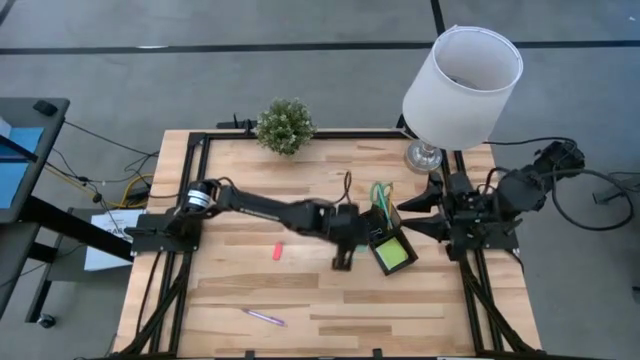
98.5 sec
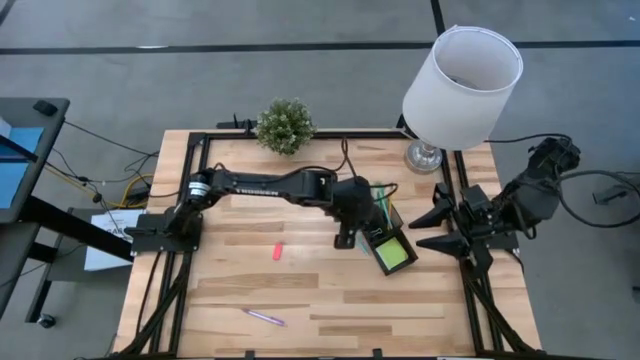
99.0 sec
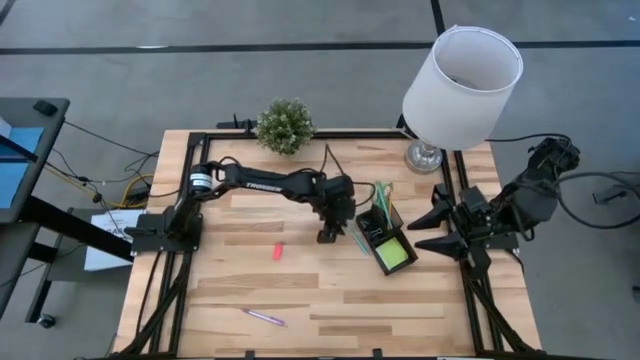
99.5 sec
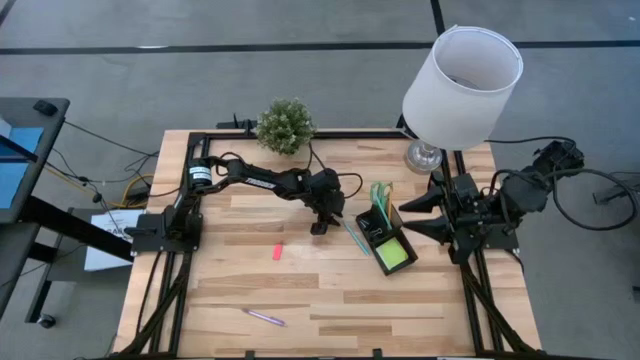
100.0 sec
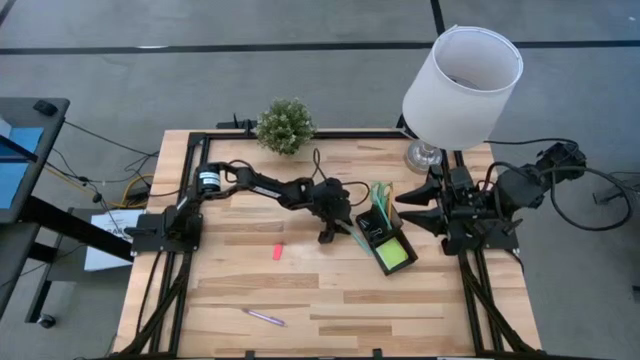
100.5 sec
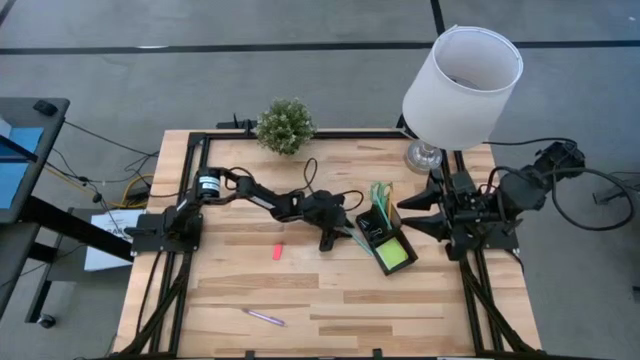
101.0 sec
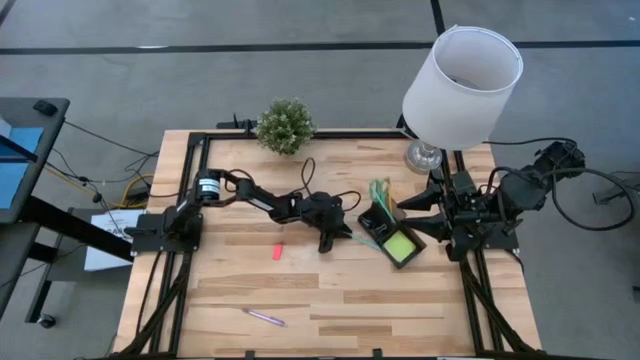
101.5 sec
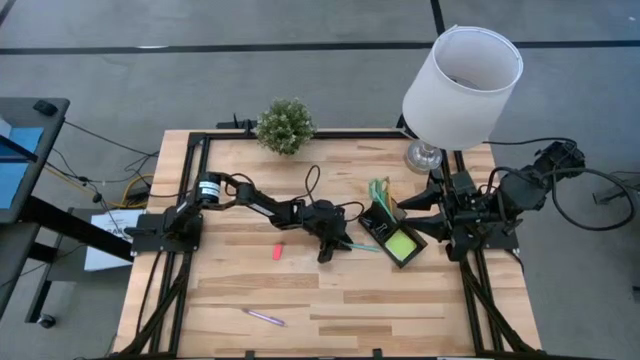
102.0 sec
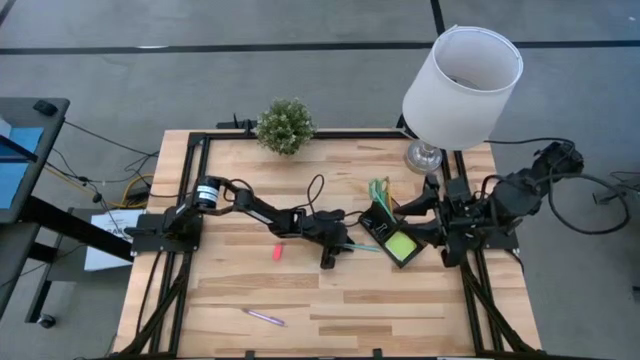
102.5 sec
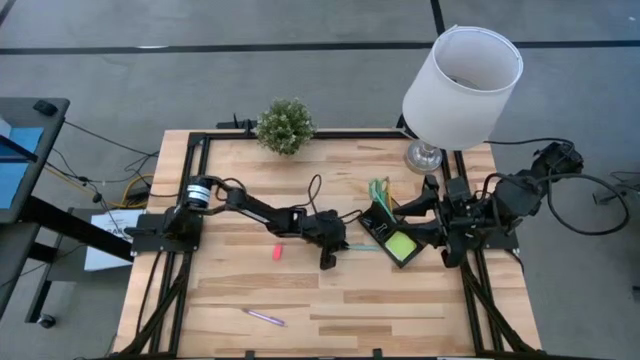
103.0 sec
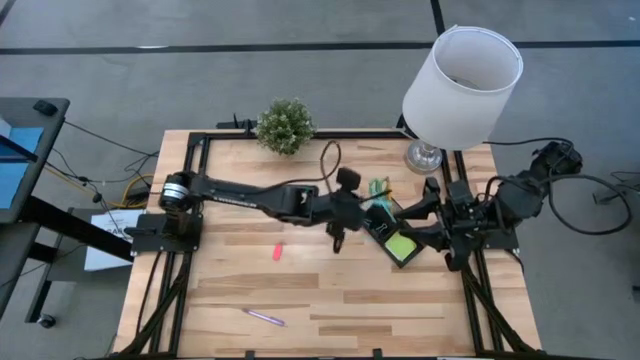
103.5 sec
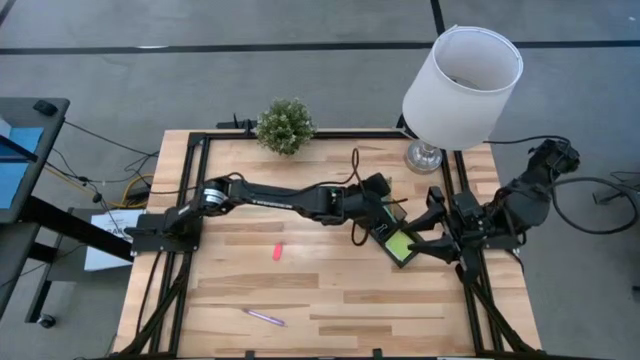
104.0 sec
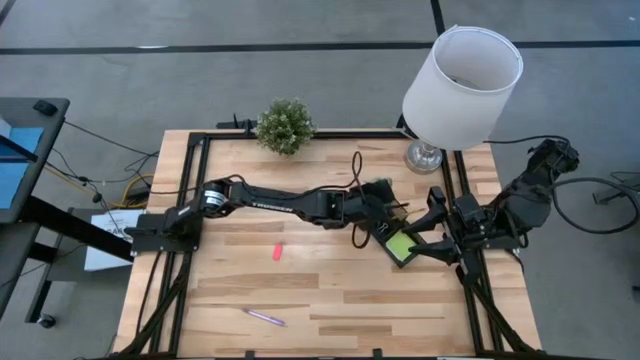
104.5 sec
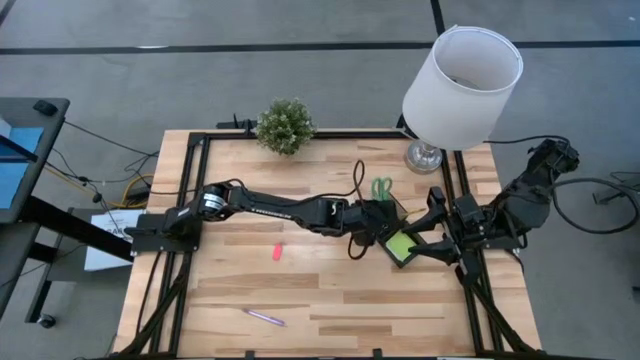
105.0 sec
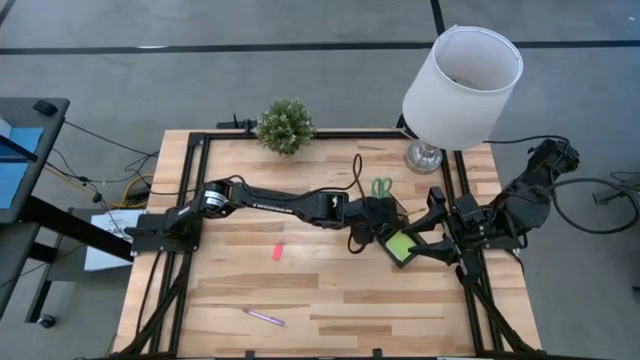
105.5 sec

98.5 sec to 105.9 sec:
Task: Pick and place office supplies into organizer
Put the blue pen into the black desk organizer

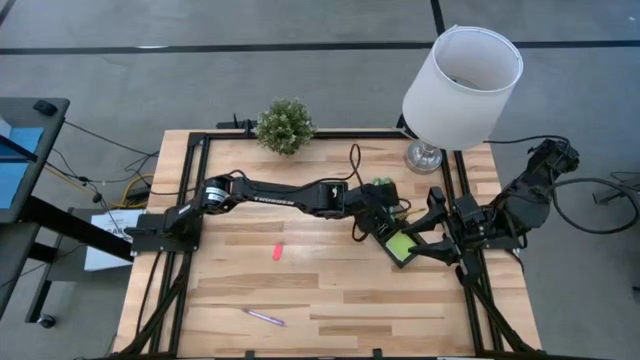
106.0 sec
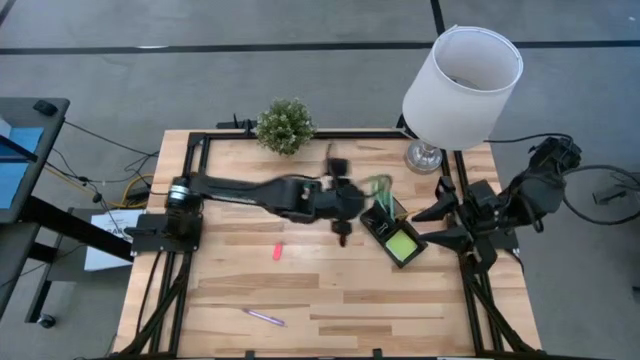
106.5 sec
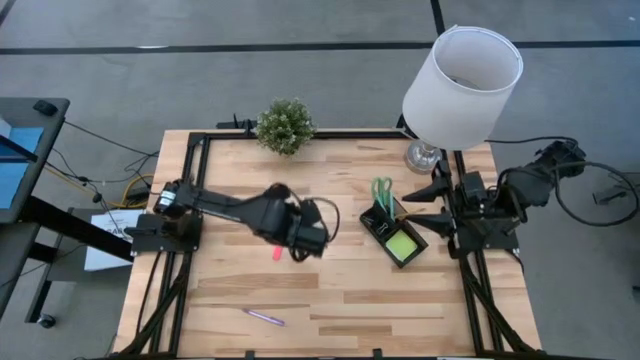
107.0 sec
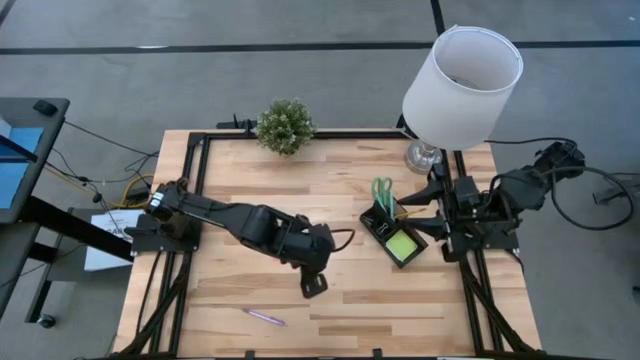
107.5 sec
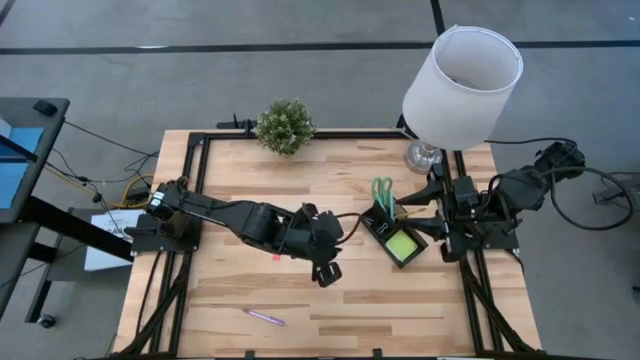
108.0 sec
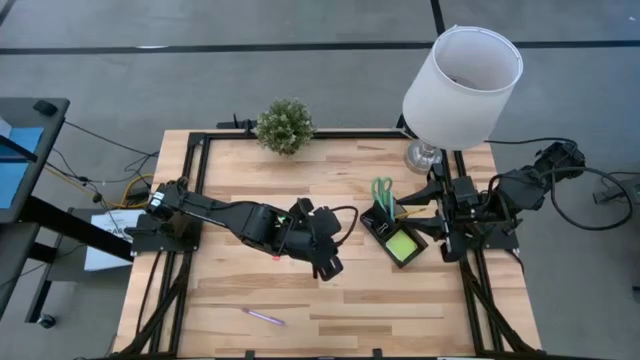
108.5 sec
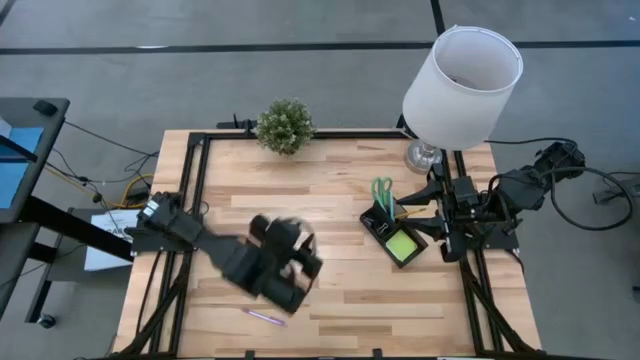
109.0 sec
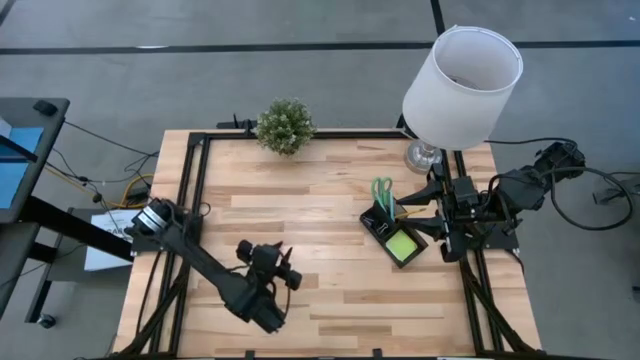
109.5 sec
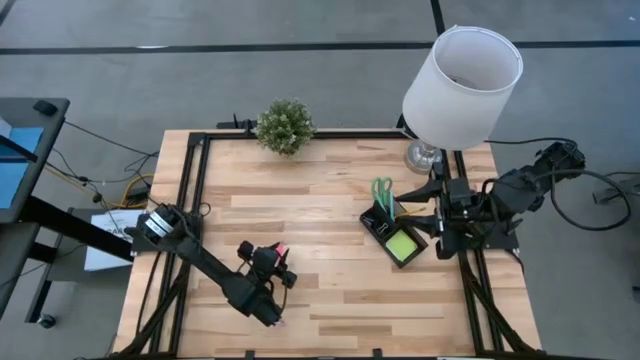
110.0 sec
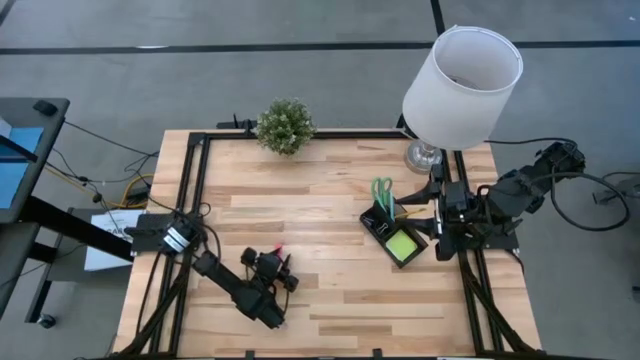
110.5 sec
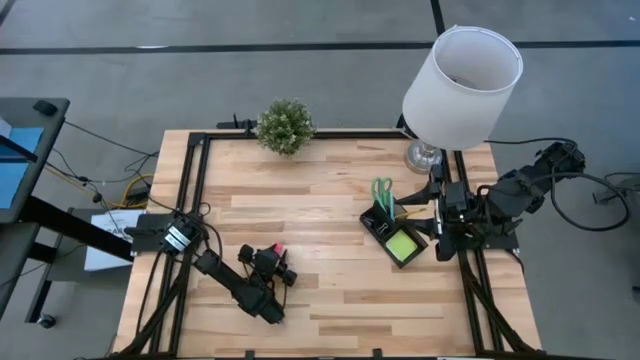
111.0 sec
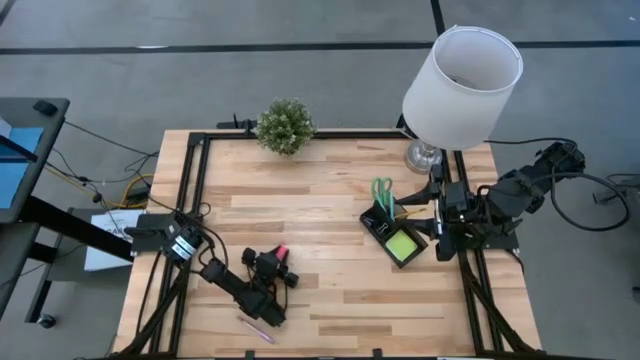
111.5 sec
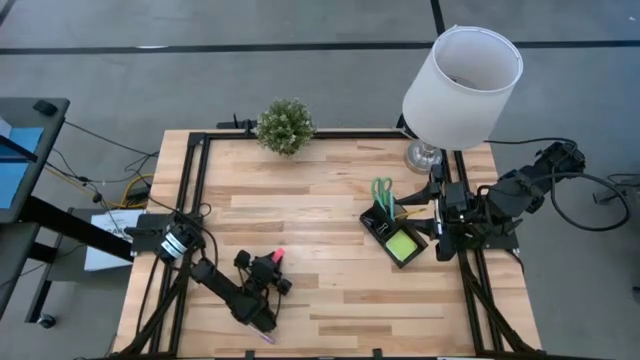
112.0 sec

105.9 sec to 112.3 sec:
Put the pink eraser into the black desk organizer

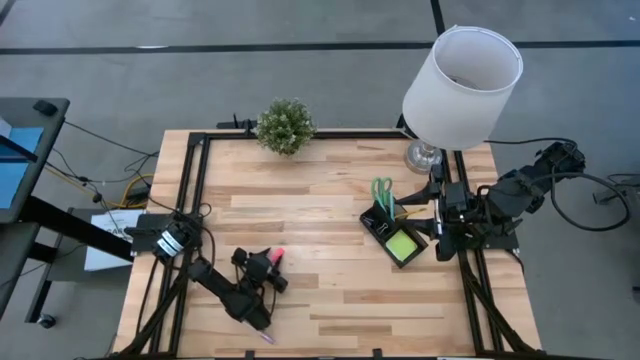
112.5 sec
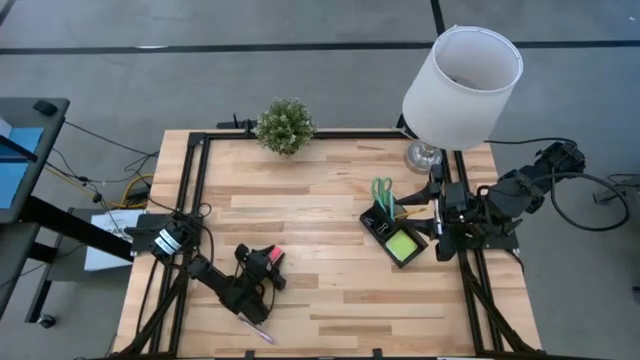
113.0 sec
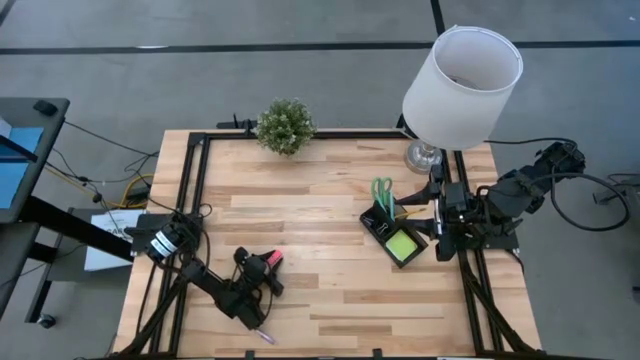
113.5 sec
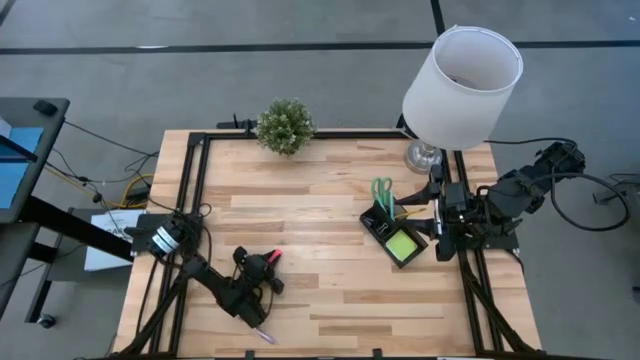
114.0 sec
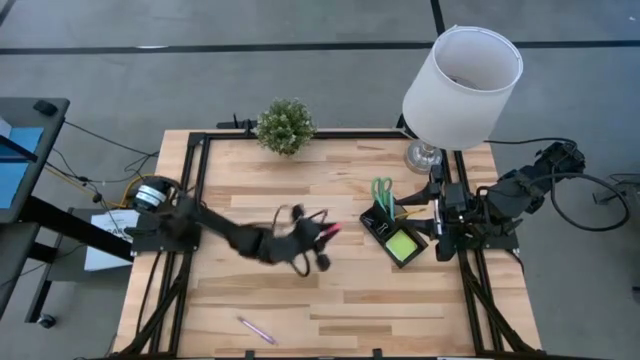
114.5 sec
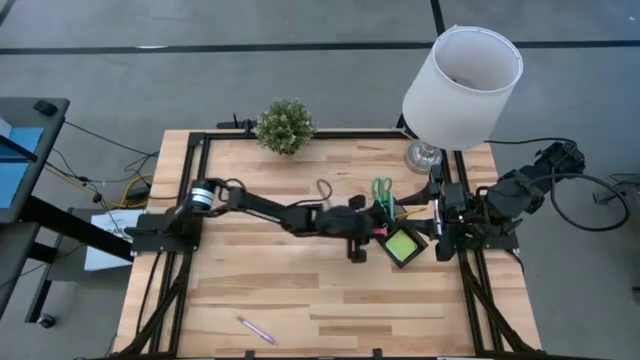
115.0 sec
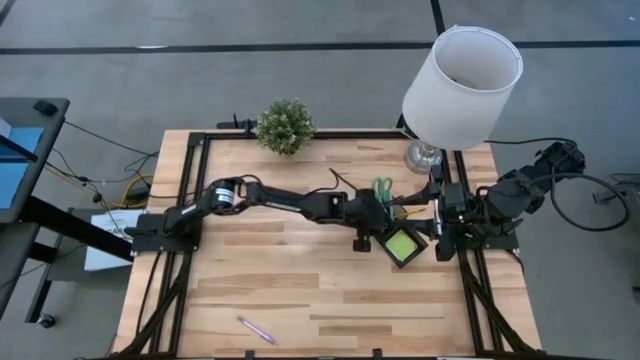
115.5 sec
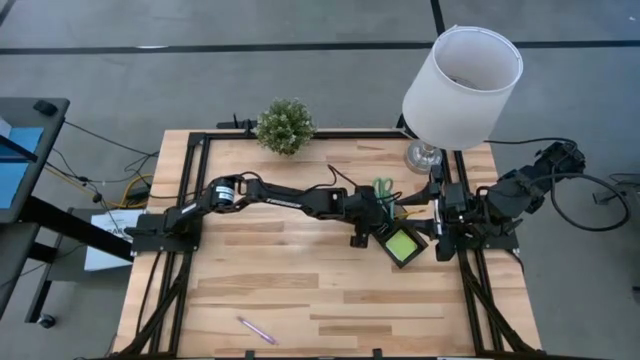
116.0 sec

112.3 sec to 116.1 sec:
Put the pink eraser into the black desk organizer

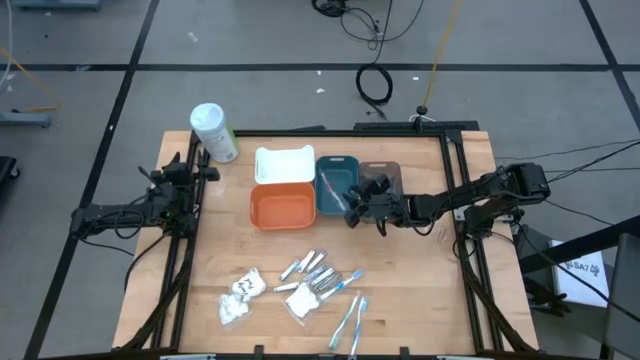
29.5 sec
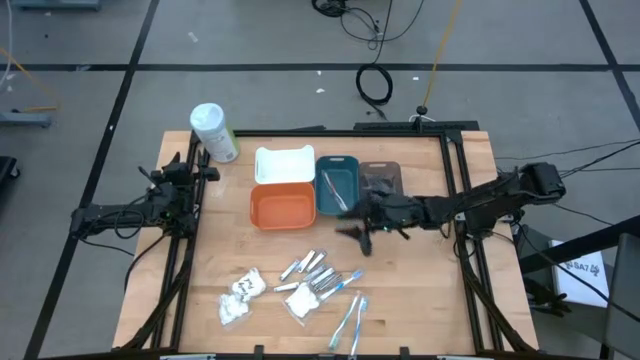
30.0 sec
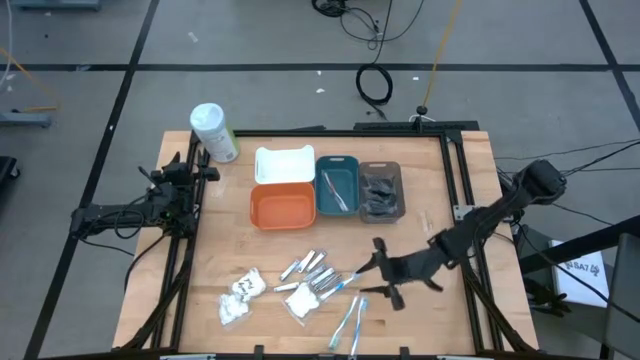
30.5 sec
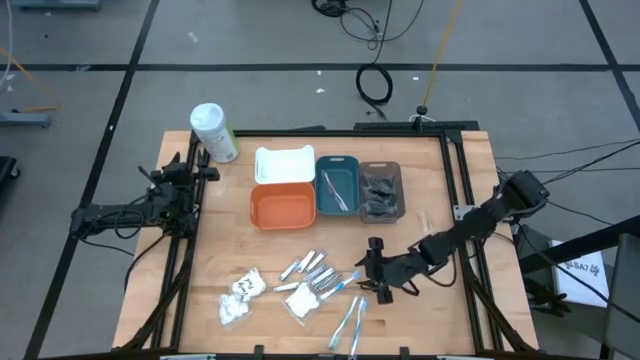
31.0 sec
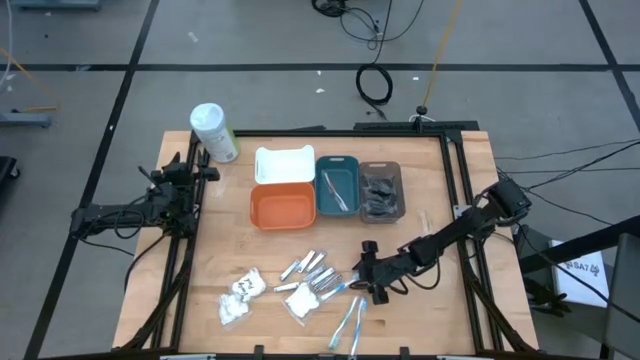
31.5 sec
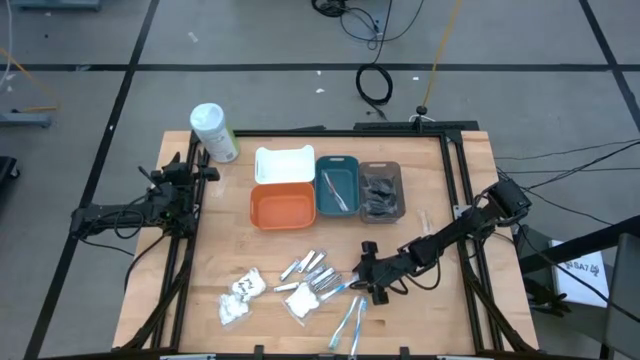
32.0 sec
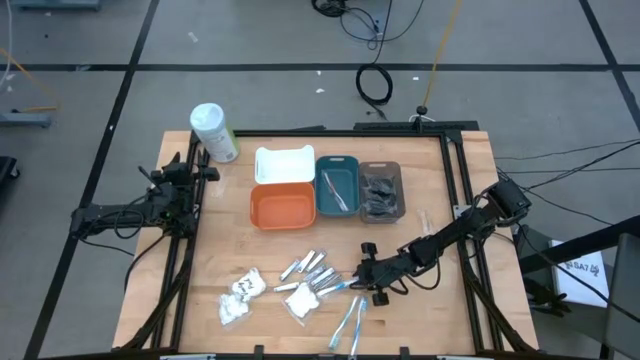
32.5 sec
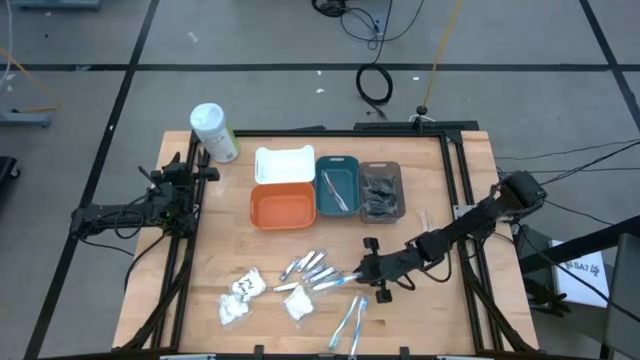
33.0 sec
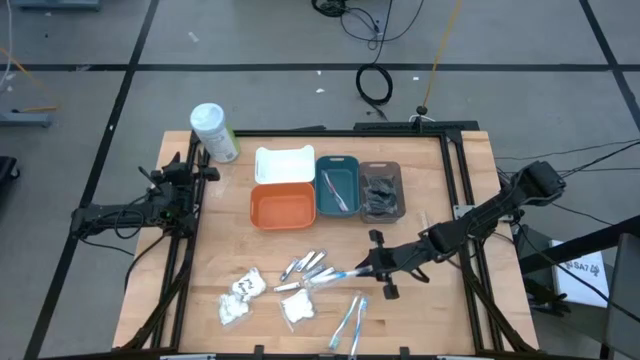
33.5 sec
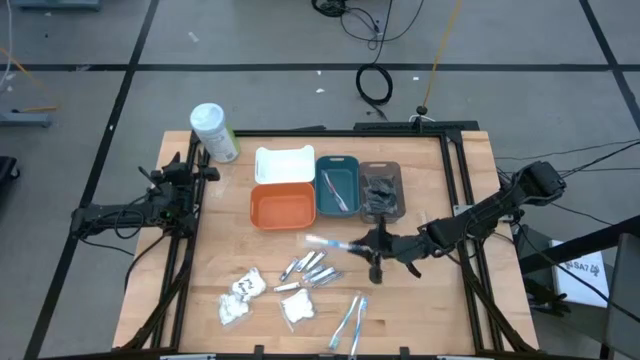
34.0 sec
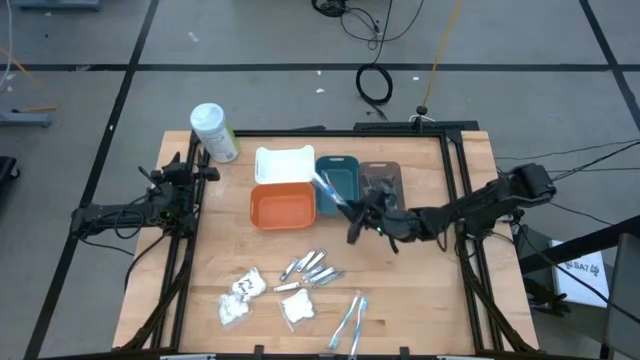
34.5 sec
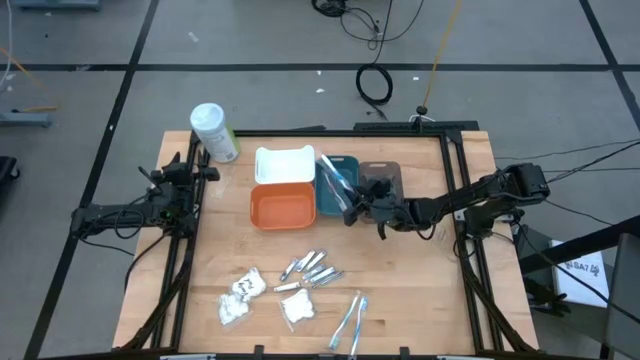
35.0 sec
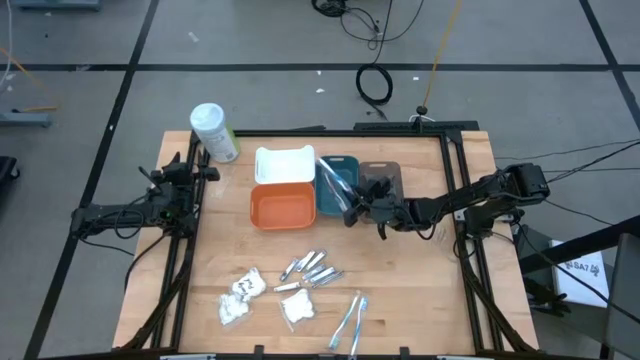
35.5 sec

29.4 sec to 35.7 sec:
Task: Pick & Place Travel size toiletries
Put the blue toothbrush into the dark green bin
